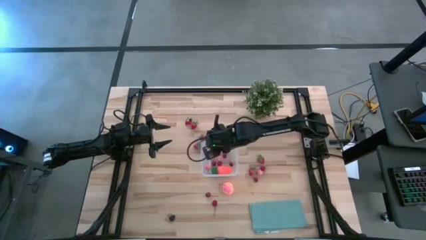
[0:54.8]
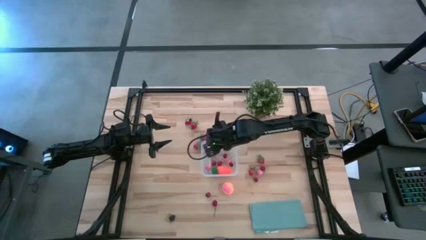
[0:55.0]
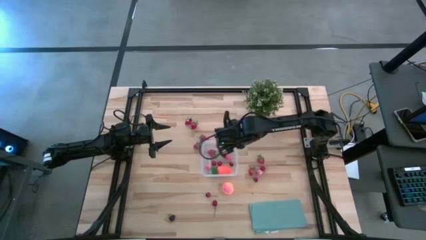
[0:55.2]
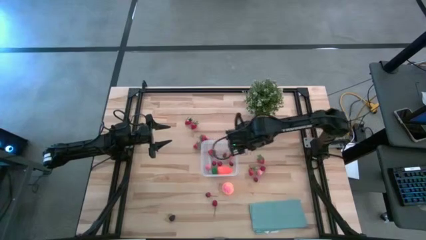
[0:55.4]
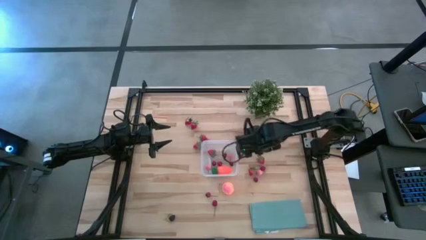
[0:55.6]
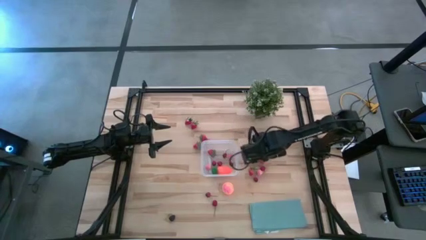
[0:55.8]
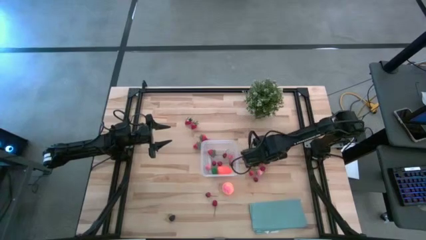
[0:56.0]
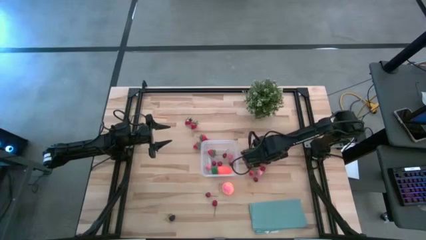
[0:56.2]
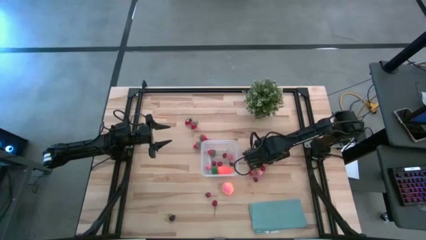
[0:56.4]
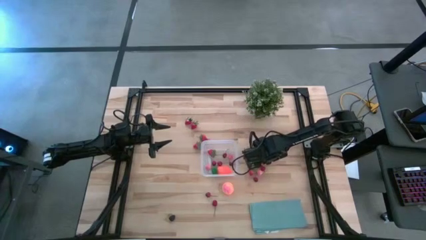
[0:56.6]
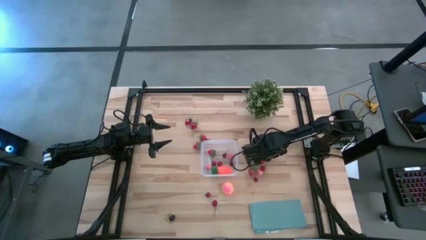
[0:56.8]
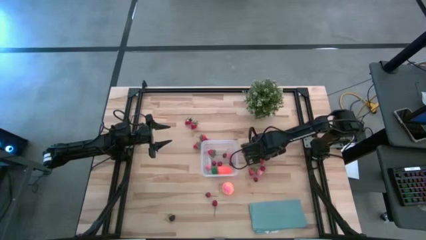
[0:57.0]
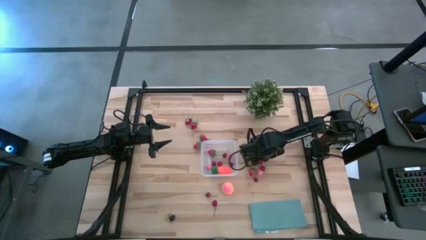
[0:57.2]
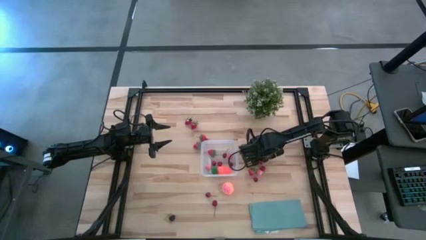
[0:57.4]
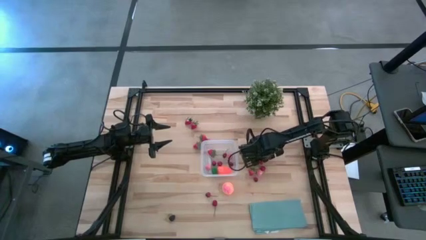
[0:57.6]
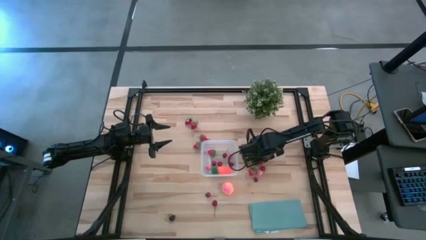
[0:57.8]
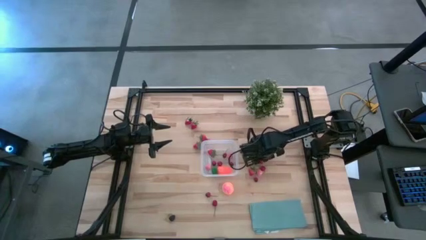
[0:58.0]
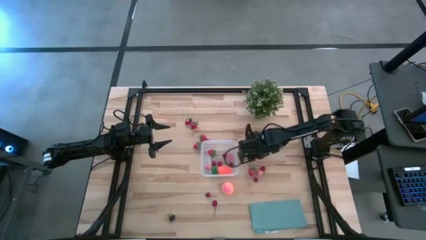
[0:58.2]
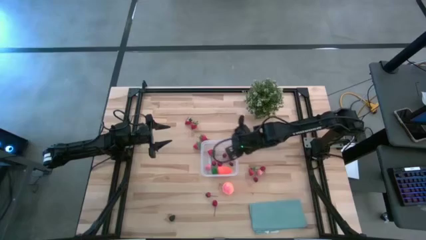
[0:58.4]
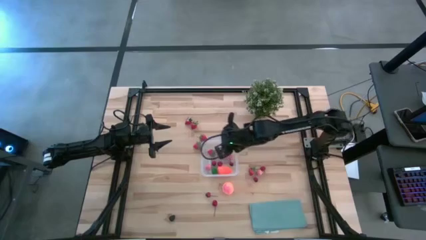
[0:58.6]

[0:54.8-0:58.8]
Task: Pick and placing Produce into tupperware
Put the strawberry into the transparent bin

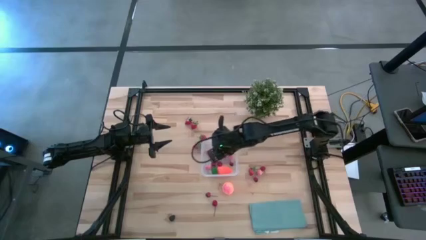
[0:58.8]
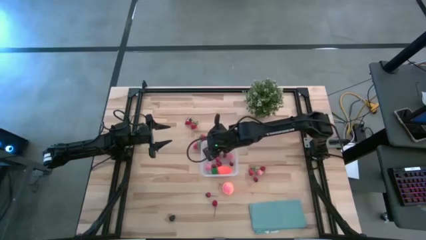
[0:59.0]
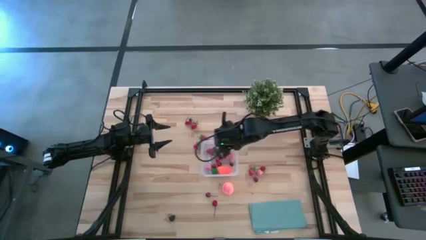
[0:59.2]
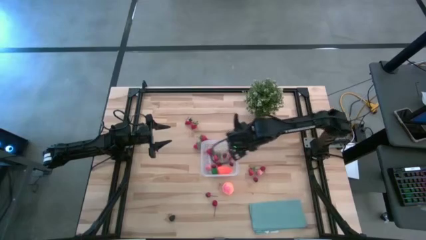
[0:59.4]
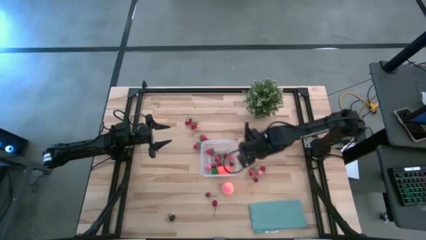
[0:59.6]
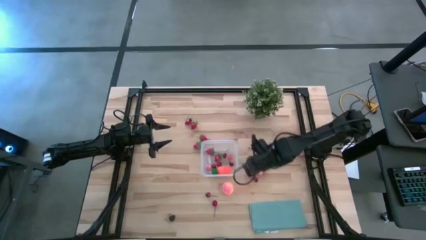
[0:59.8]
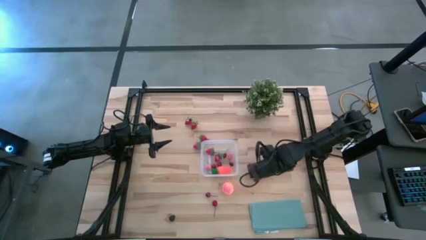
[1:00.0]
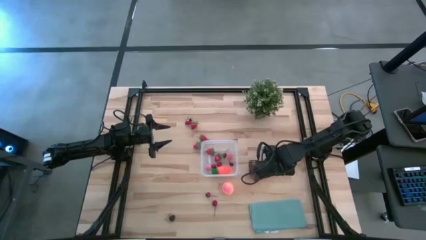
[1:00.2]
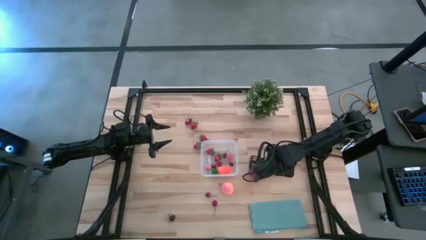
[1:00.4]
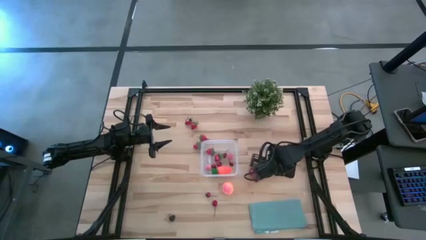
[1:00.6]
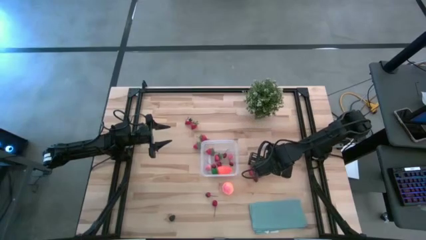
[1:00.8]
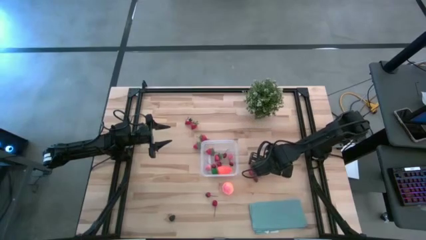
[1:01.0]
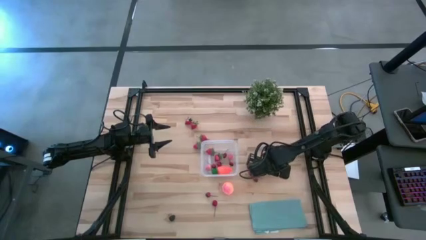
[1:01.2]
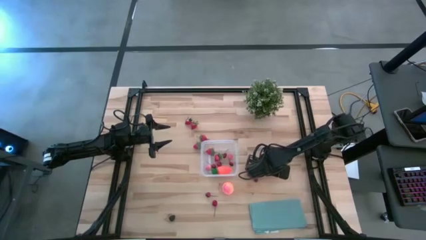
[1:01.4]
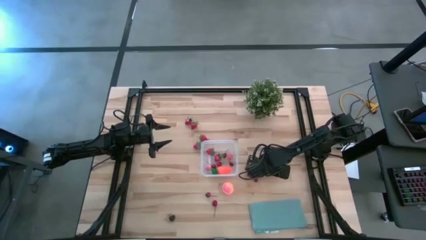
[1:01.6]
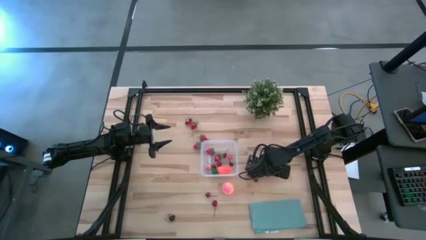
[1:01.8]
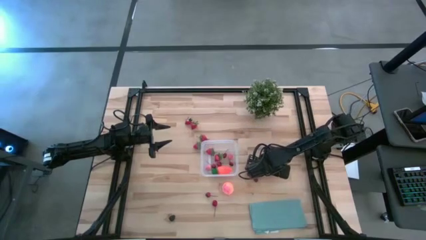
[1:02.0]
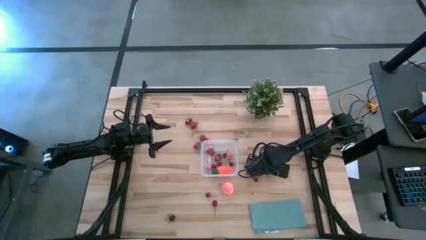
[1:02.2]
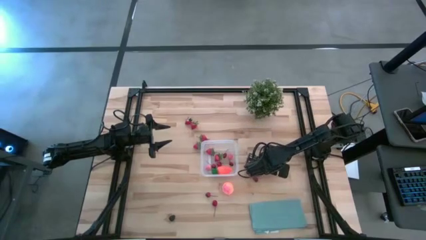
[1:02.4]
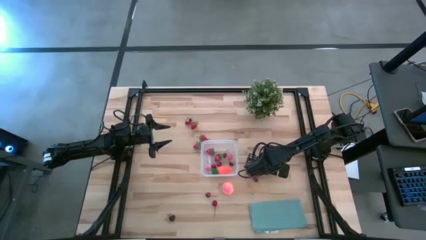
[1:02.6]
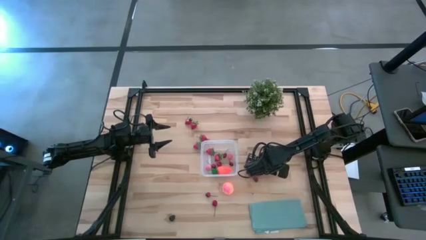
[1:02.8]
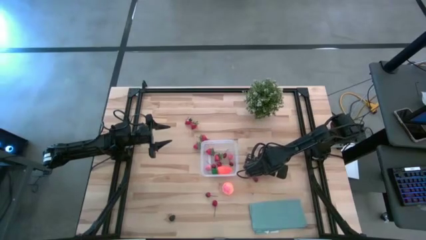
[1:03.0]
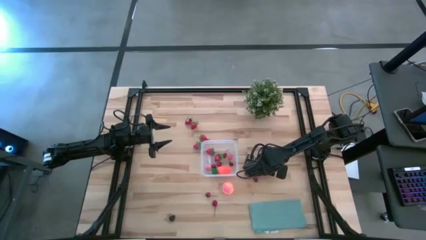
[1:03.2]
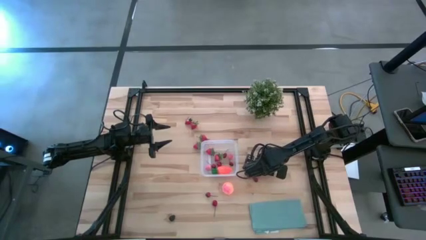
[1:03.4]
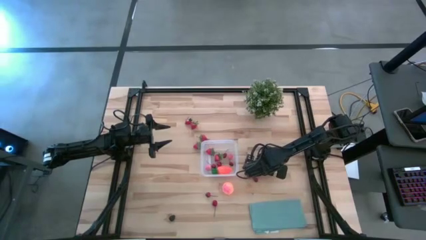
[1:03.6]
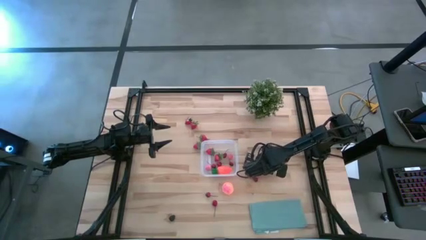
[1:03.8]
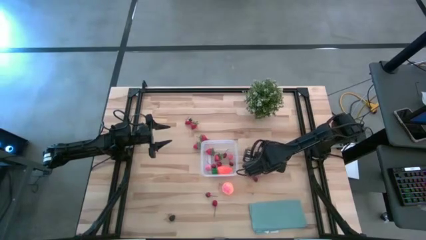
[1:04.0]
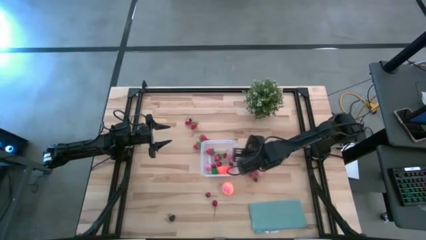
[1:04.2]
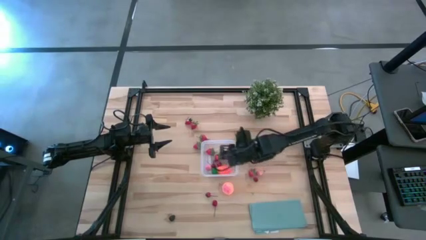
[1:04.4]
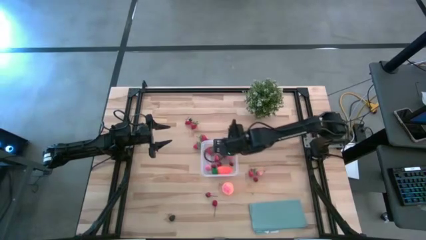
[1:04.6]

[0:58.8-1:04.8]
Put the cherry into the transparent bin

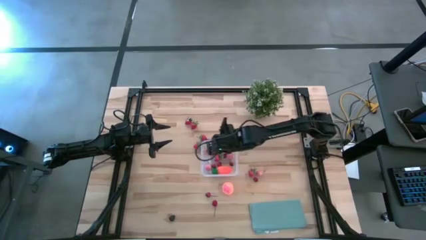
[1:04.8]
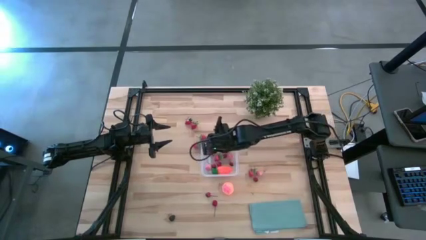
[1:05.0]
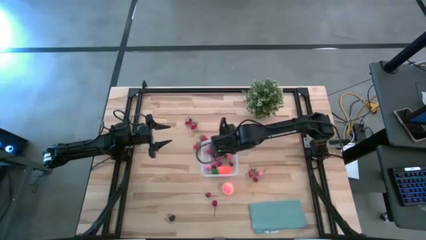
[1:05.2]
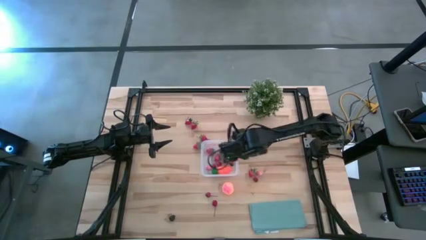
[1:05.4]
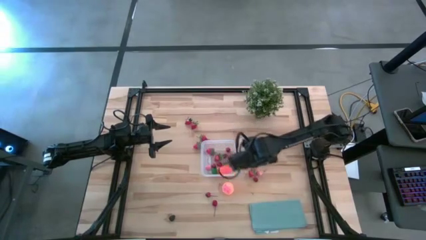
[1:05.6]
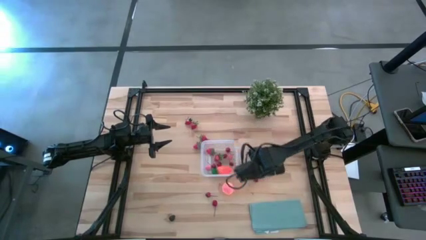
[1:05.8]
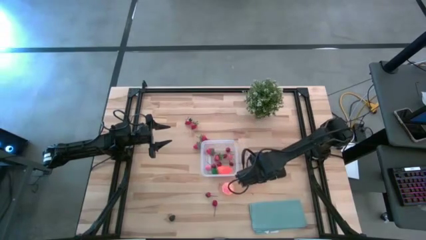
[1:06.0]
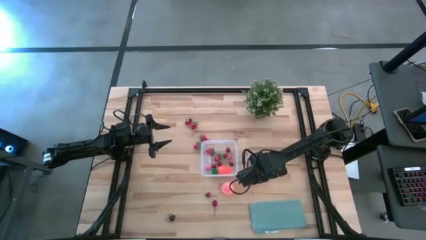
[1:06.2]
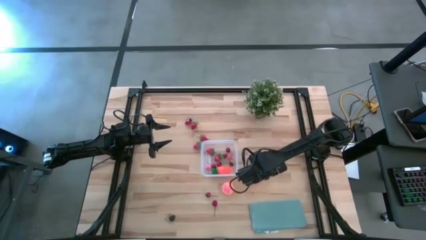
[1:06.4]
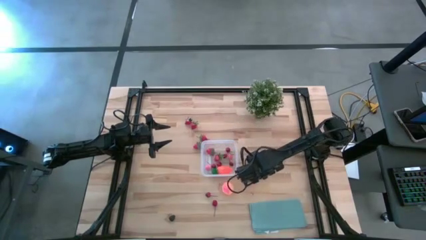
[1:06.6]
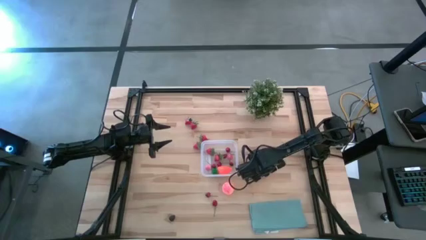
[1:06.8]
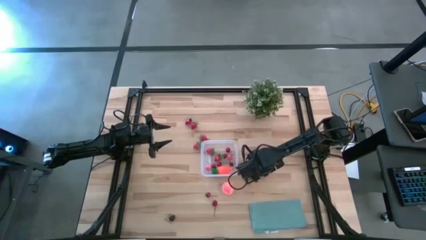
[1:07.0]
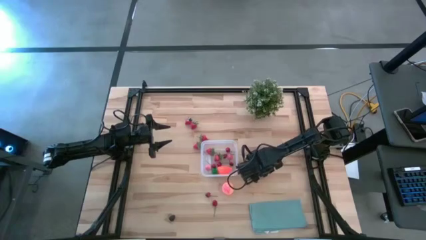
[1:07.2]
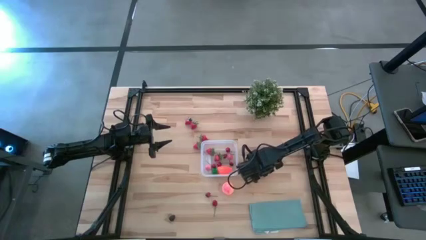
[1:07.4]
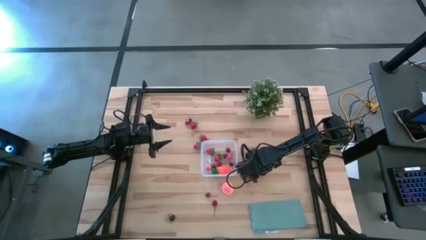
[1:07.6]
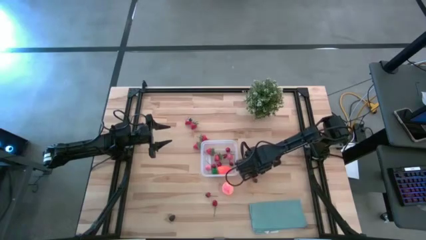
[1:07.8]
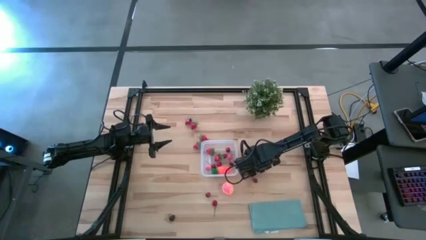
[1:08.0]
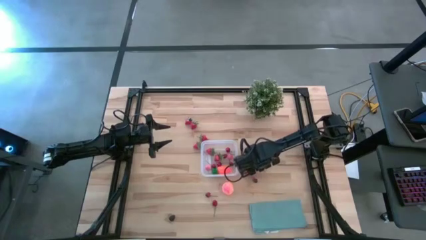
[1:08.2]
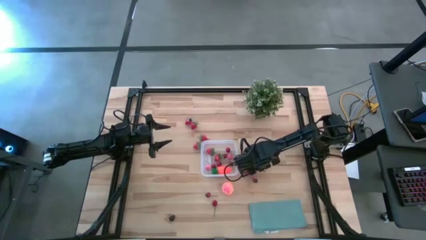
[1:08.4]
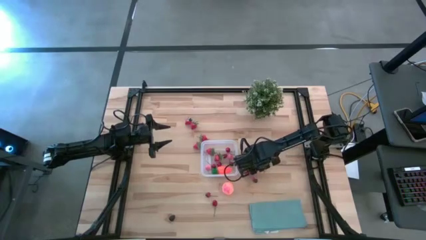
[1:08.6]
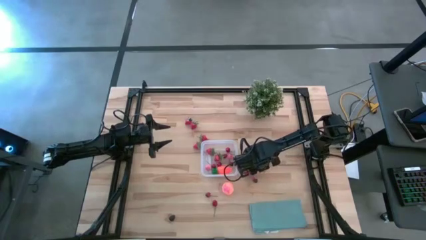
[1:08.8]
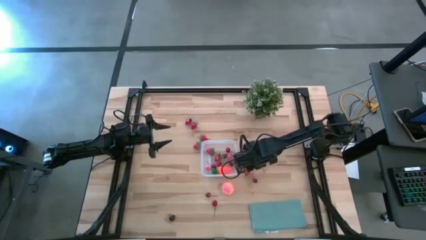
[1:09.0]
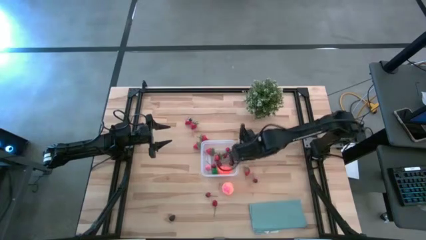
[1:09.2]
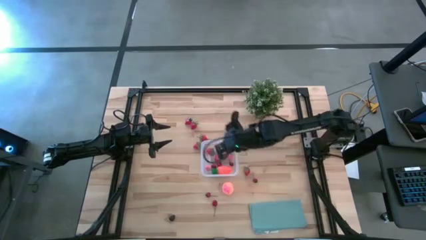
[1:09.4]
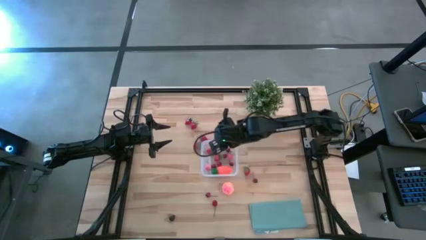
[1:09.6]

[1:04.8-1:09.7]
Put the peach into the transparent bin

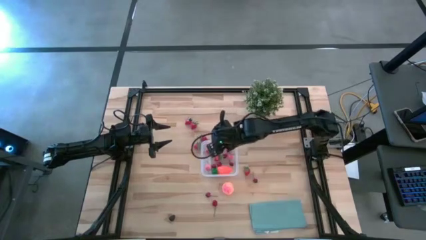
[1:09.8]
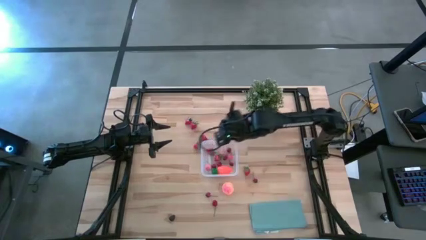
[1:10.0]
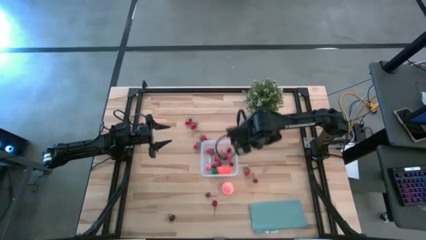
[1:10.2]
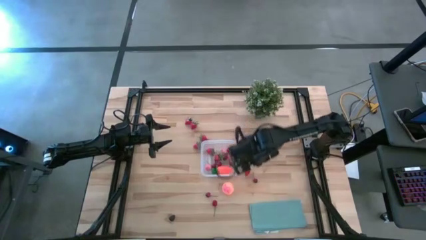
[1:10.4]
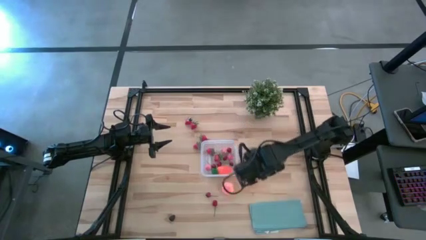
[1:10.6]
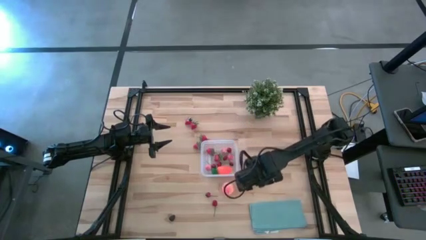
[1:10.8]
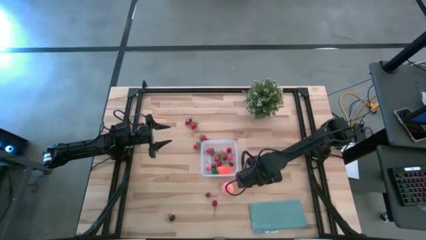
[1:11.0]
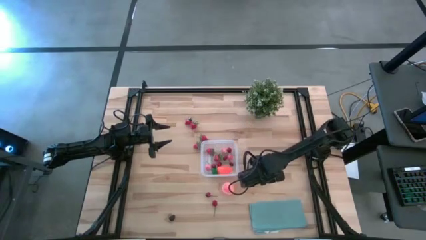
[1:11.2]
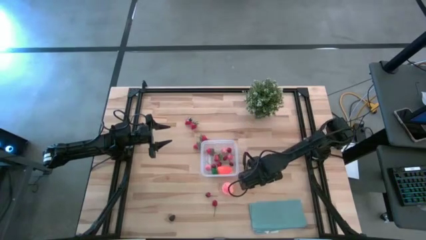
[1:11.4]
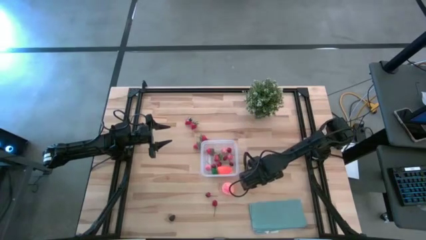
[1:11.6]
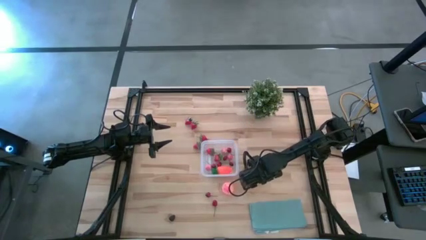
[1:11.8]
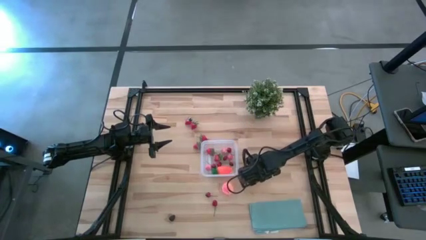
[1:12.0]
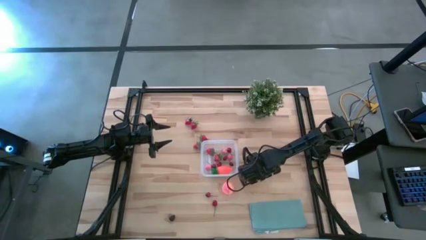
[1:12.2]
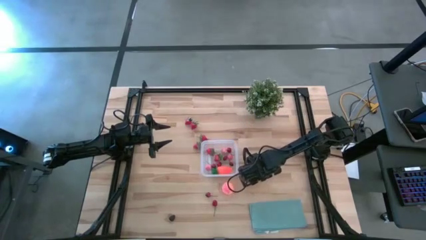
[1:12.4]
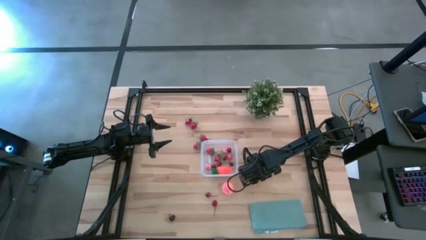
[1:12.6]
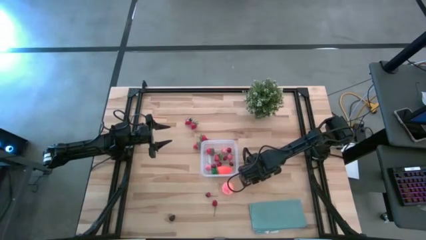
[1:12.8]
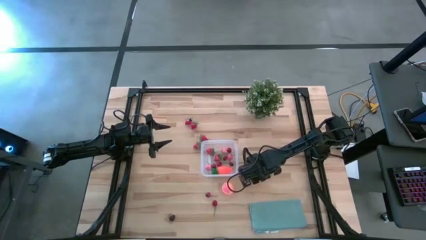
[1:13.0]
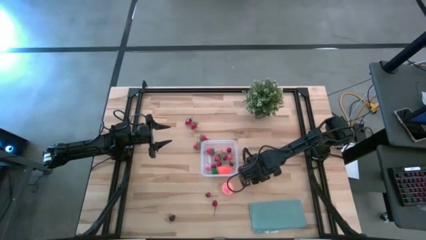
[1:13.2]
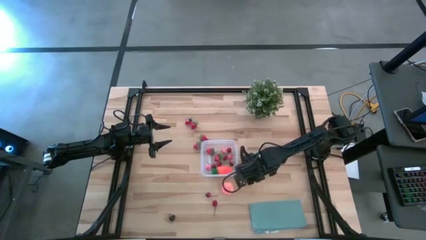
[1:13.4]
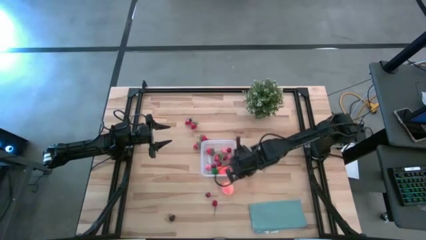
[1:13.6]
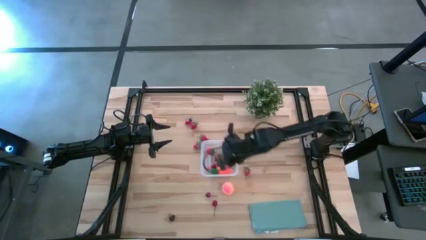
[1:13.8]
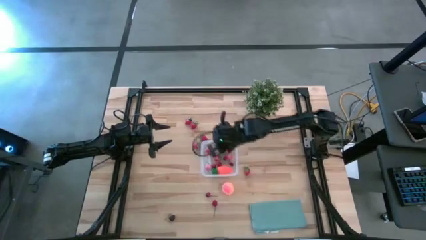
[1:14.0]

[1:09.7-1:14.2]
Put the cherry into the transparent bin
